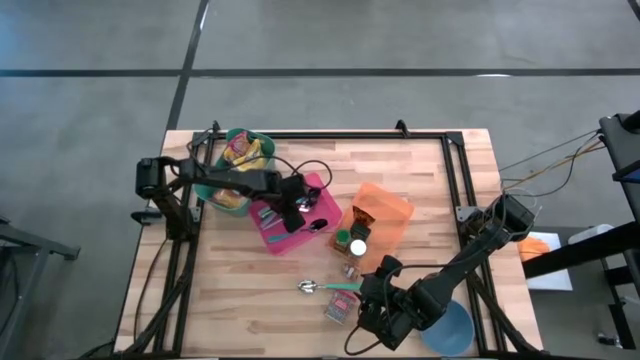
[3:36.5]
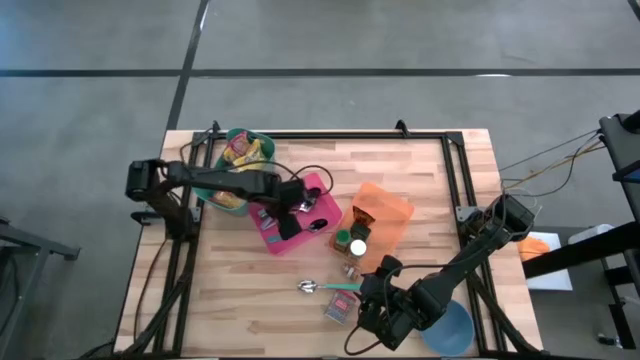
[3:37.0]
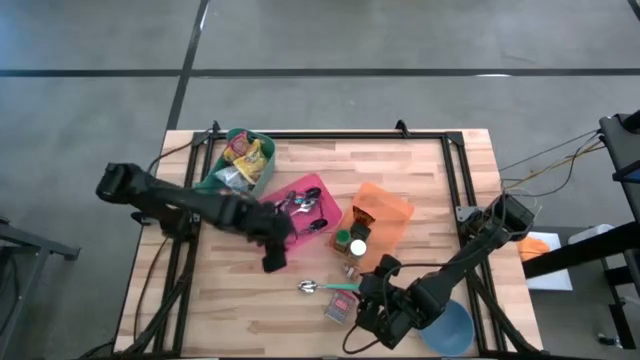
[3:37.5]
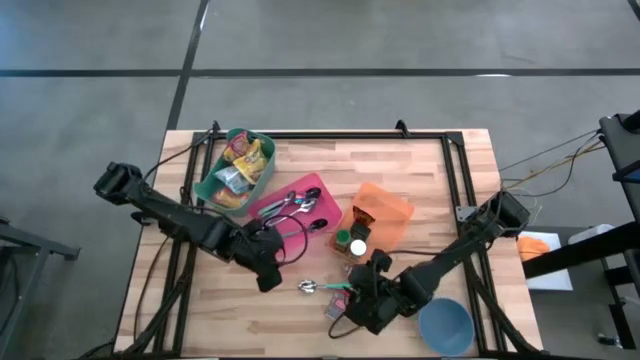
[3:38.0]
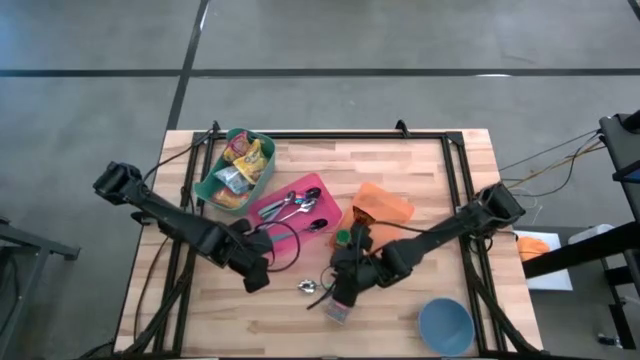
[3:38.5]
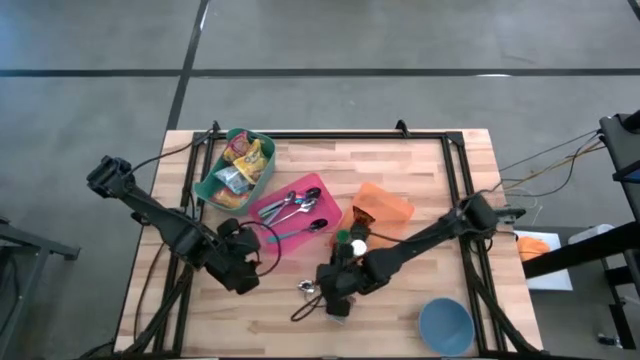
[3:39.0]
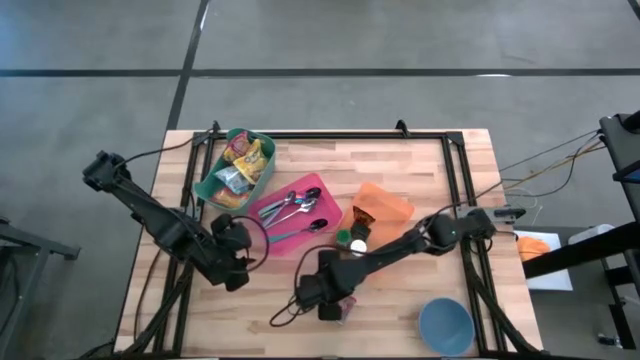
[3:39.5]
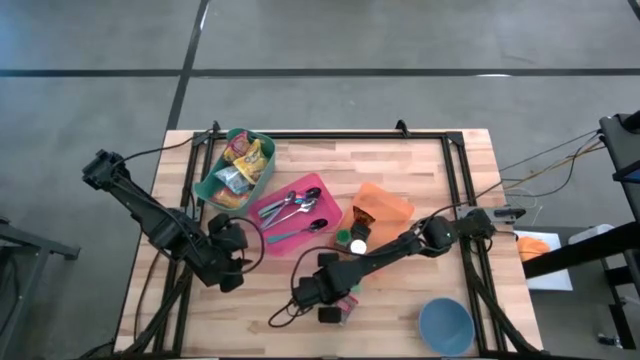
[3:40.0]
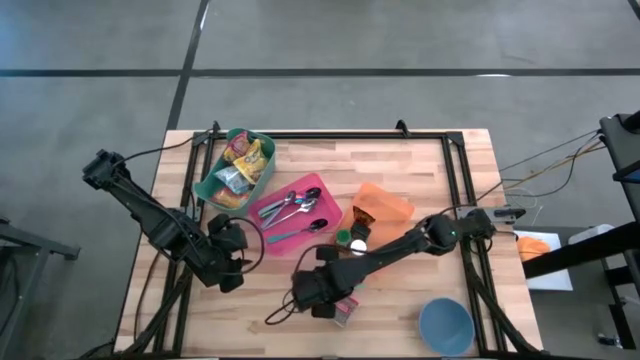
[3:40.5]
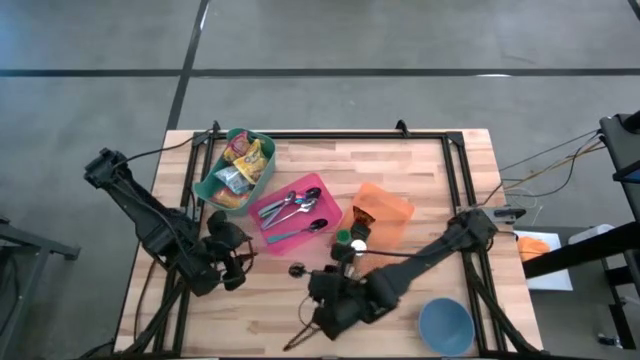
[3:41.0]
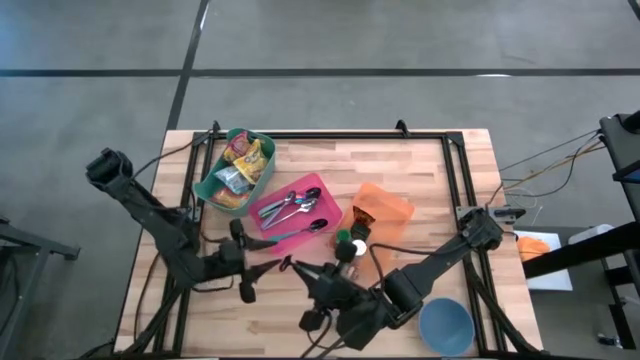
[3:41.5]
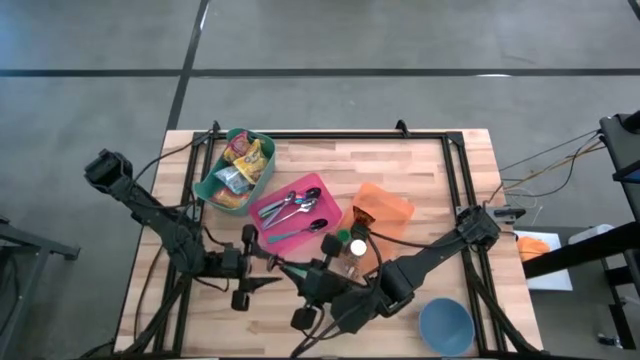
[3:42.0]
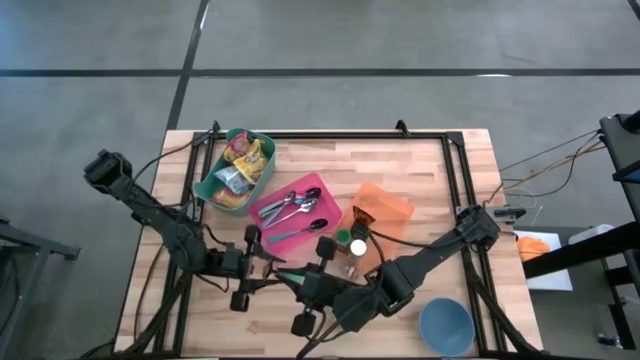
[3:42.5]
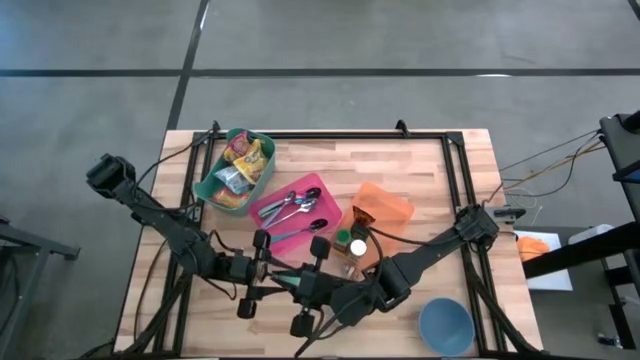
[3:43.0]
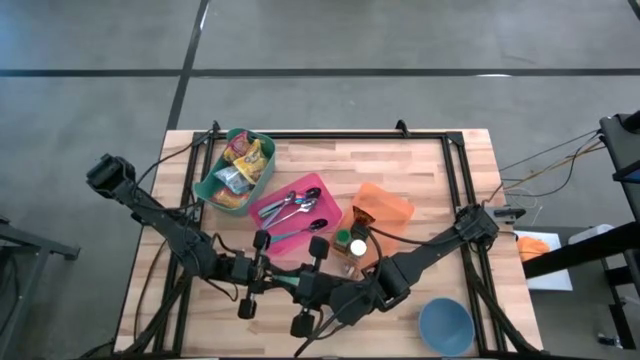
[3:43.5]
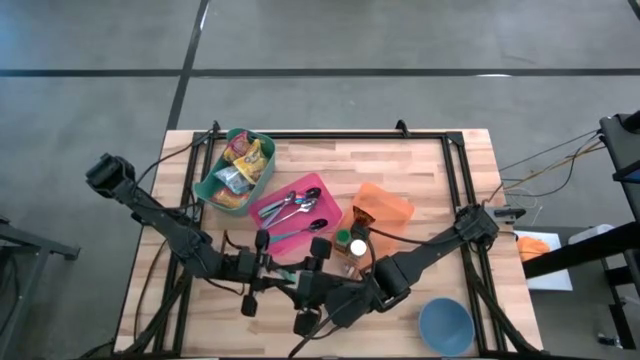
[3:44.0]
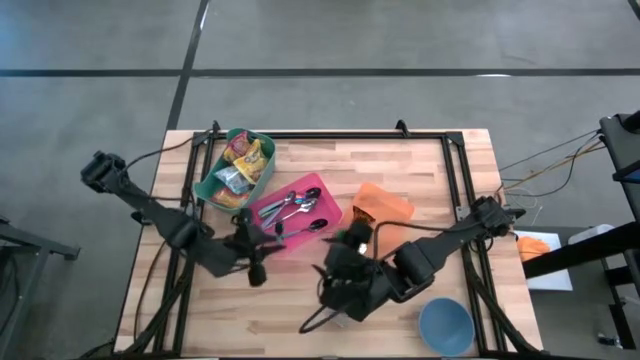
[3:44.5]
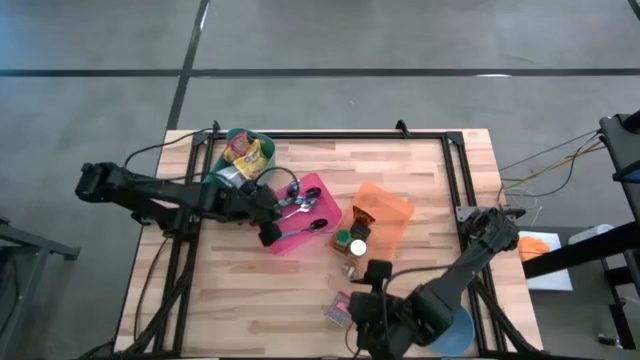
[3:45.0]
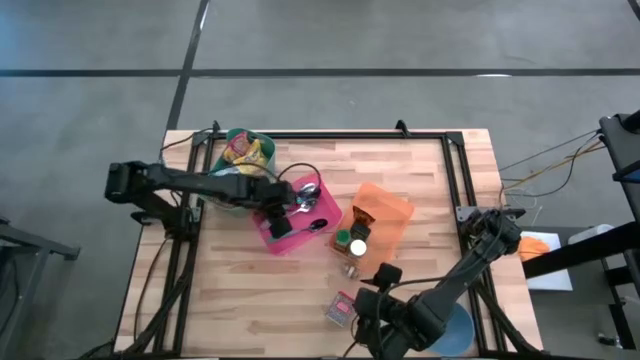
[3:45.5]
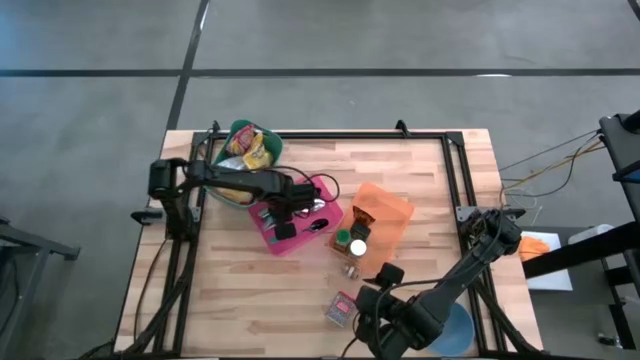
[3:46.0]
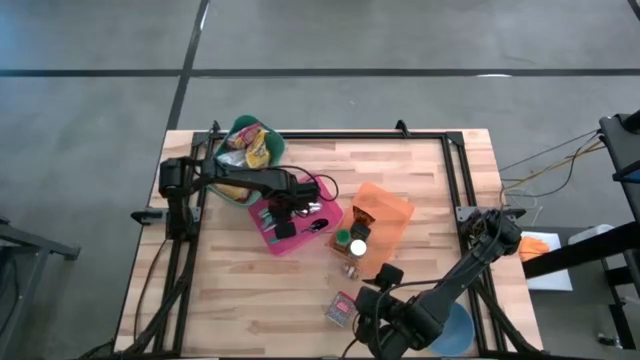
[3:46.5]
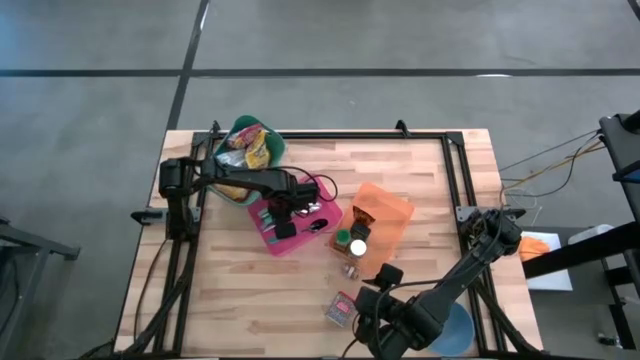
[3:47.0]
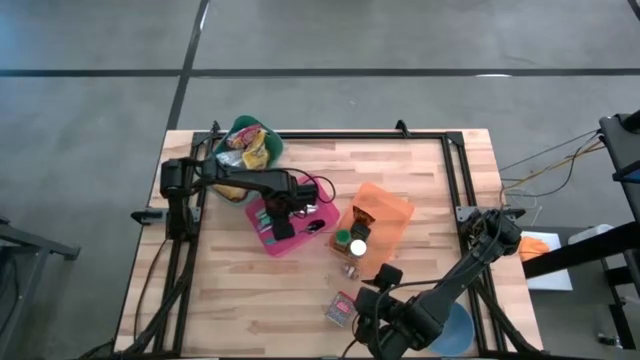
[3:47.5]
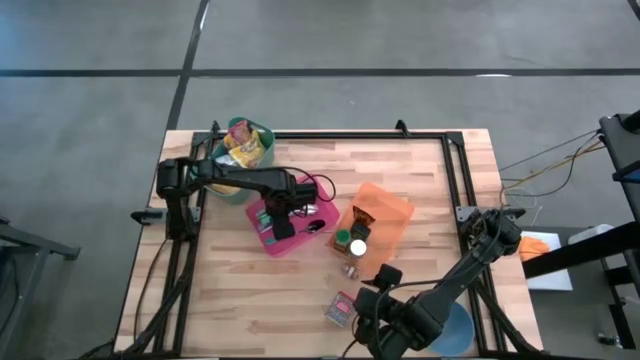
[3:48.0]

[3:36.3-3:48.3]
Put the light green spoon into the pink bin

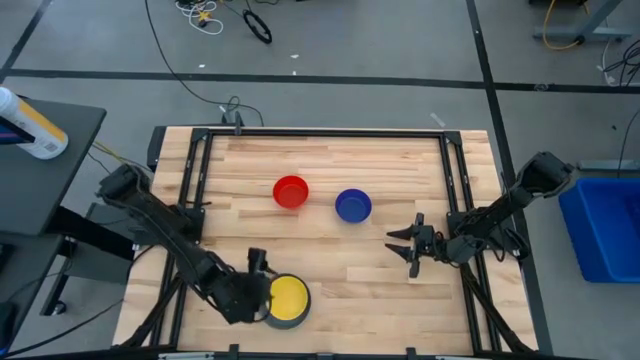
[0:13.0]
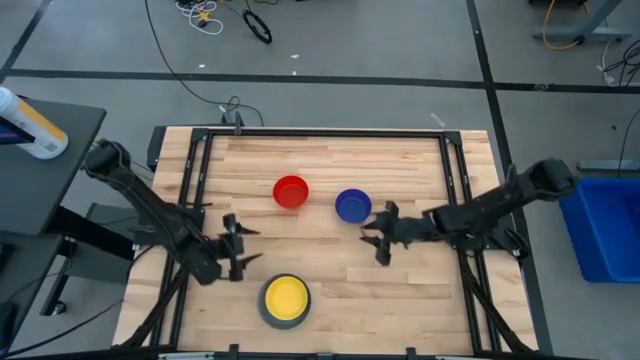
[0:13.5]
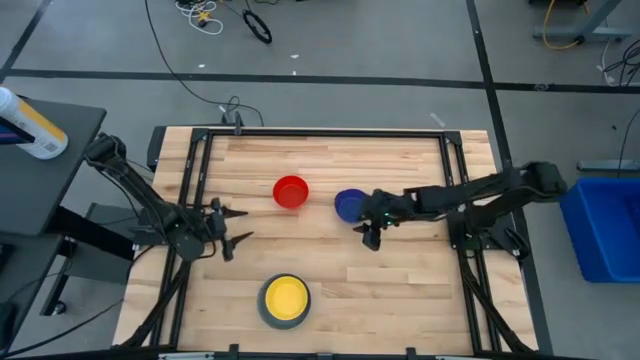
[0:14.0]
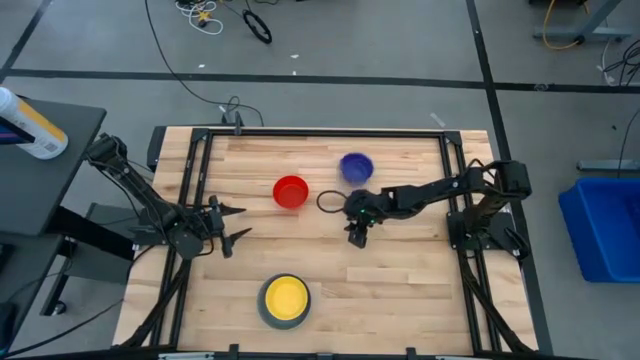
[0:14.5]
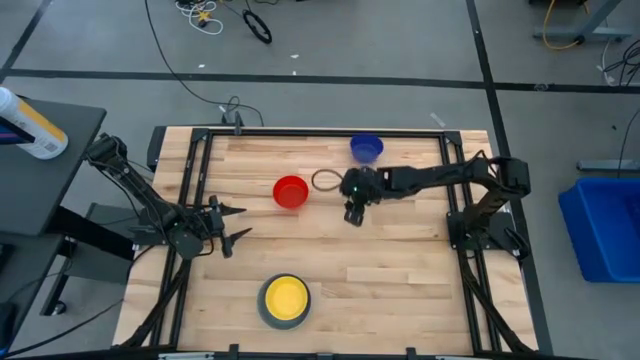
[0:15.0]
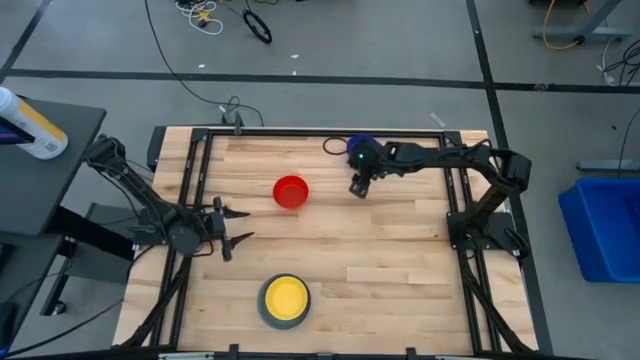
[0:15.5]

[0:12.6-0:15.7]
Stack the purple bowl on top of the yellow bowl

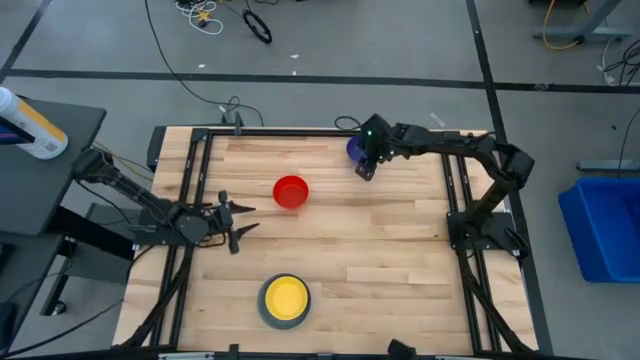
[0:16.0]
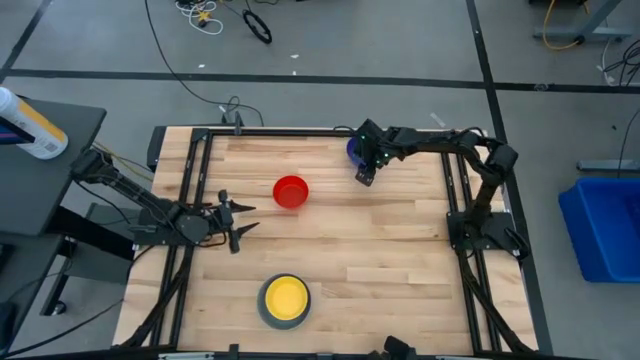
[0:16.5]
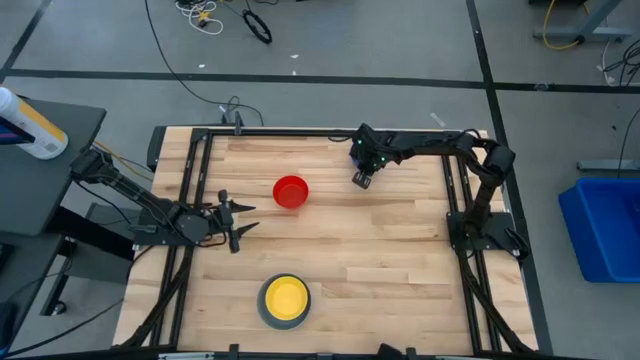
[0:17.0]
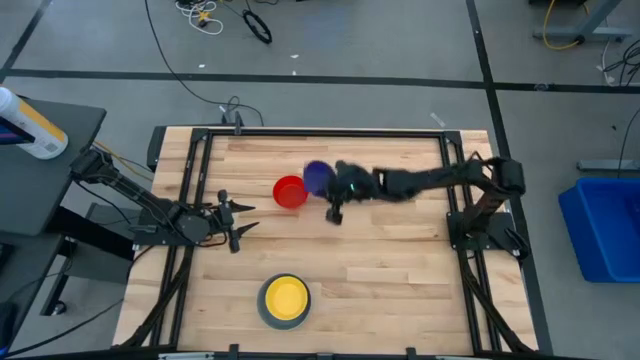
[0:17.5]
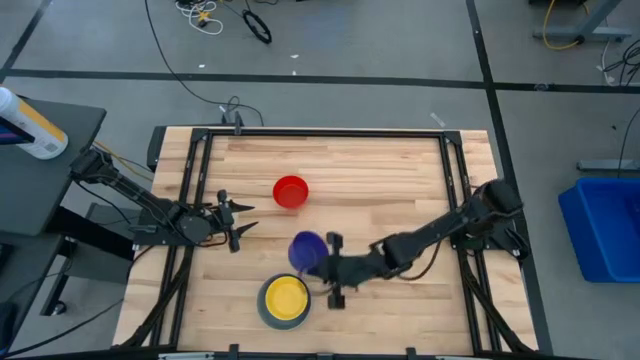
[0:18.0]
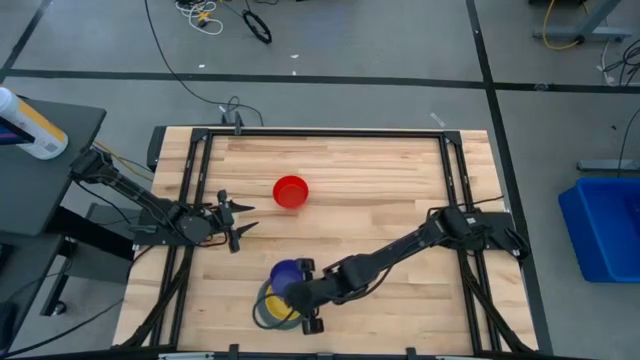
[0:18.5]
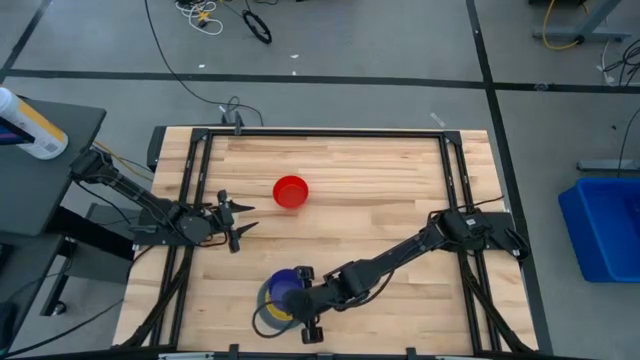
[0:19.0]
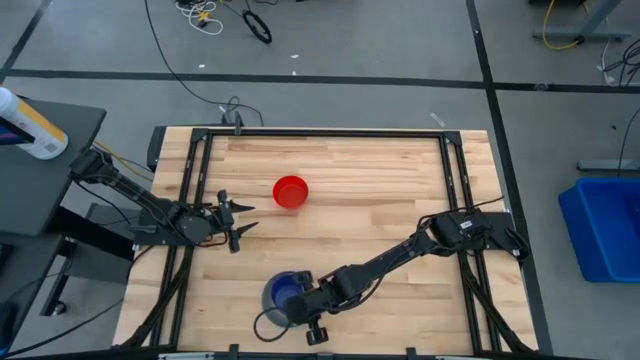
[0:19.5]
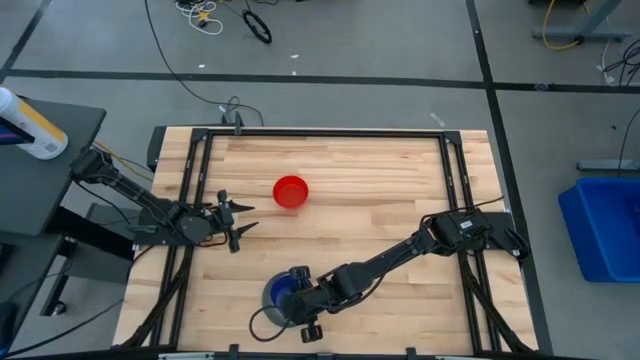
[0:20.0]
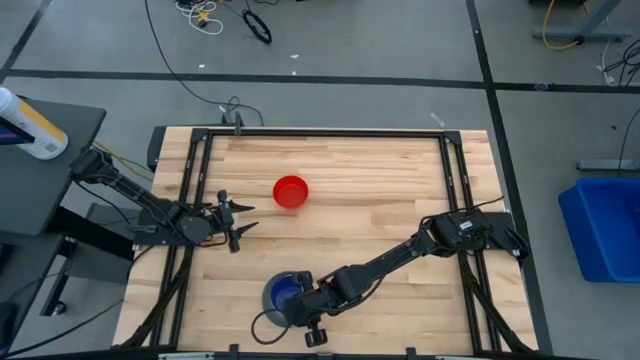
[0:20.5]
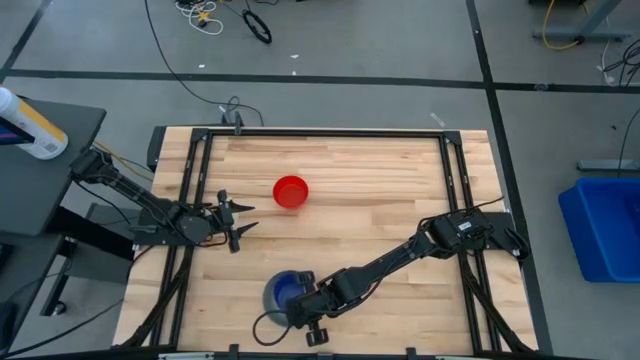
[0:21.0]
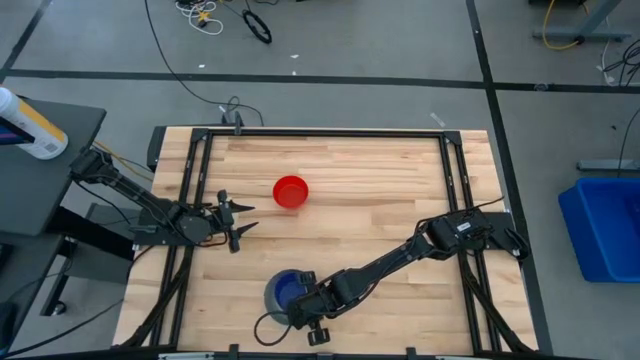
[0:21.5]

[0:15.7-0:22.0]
Stack the purple bowl on top of the yellow bowl
